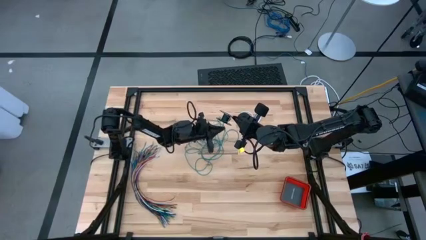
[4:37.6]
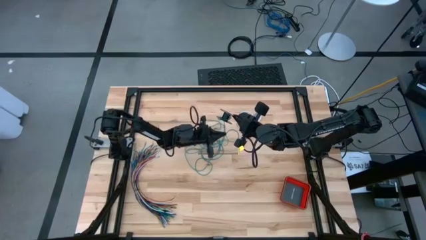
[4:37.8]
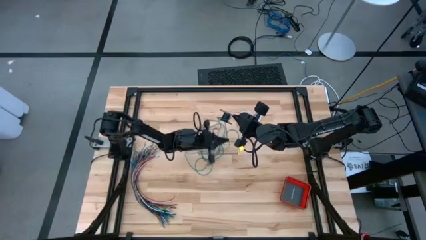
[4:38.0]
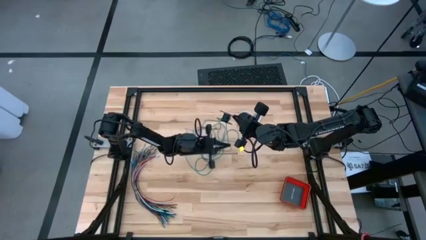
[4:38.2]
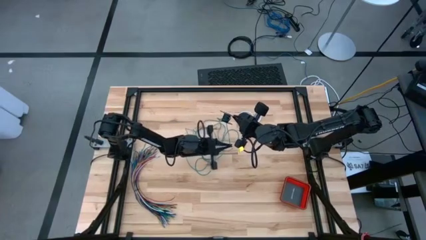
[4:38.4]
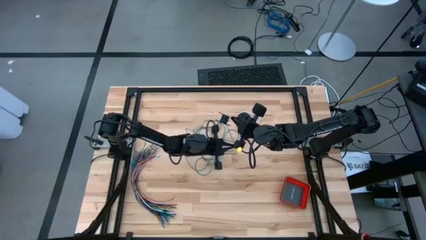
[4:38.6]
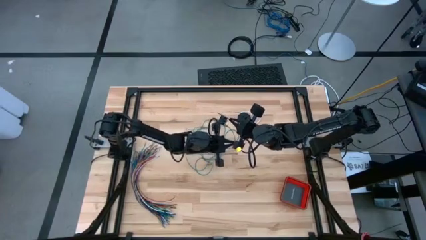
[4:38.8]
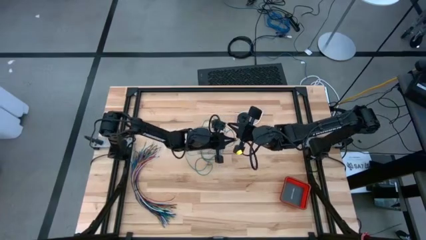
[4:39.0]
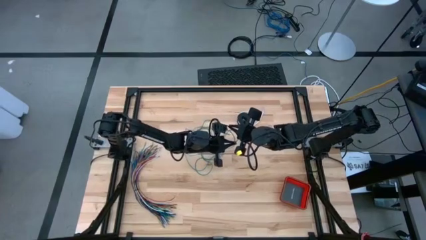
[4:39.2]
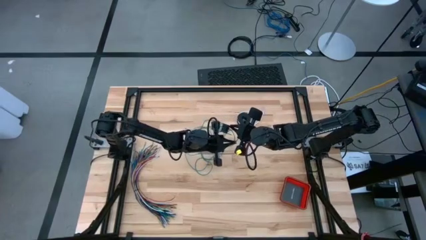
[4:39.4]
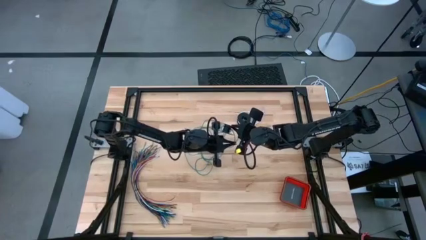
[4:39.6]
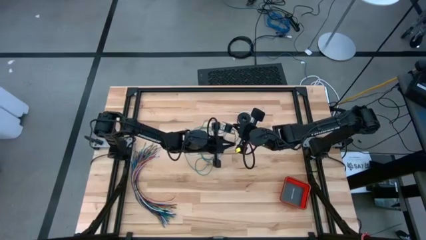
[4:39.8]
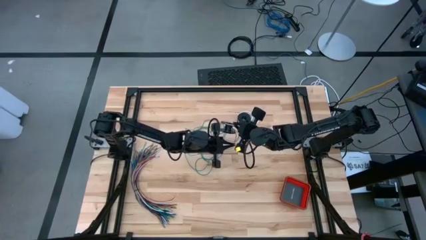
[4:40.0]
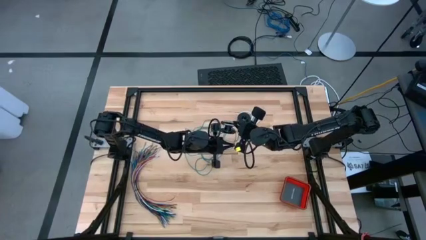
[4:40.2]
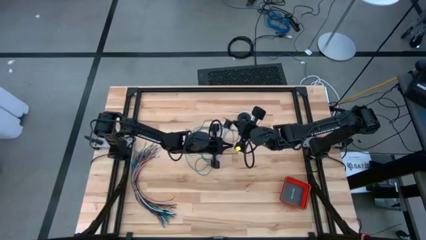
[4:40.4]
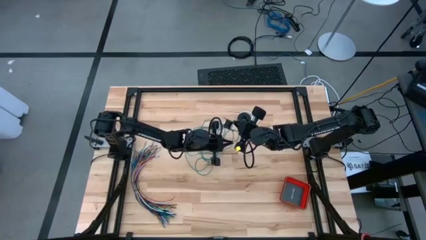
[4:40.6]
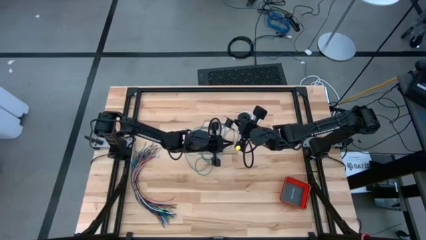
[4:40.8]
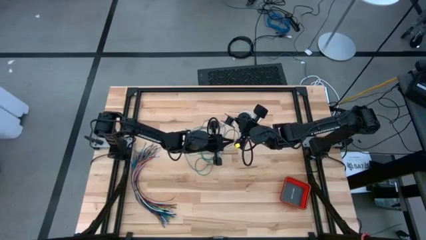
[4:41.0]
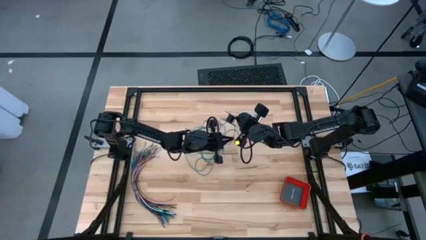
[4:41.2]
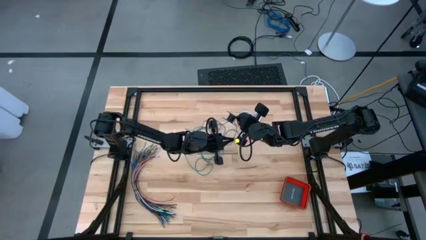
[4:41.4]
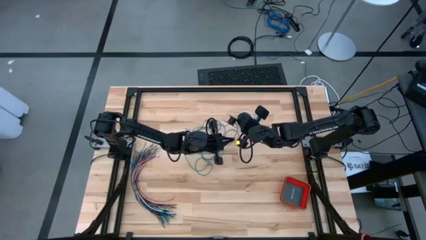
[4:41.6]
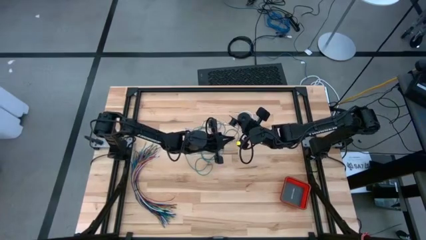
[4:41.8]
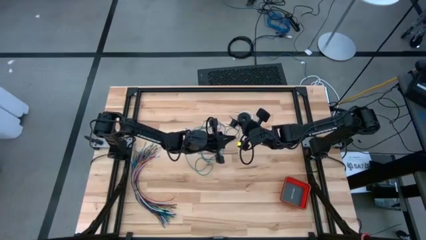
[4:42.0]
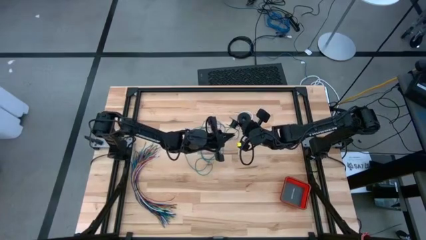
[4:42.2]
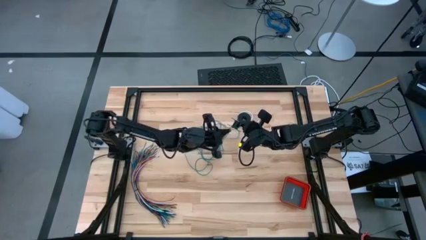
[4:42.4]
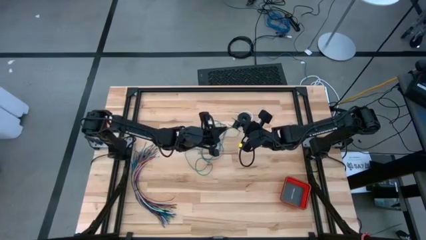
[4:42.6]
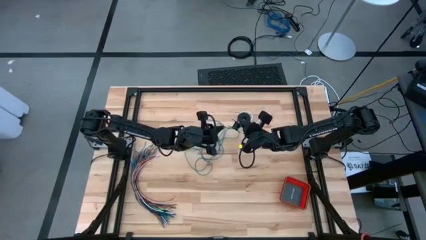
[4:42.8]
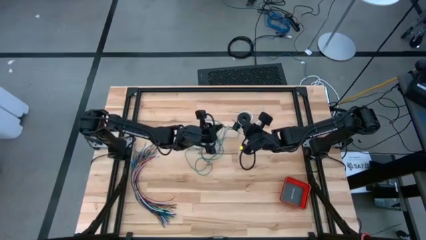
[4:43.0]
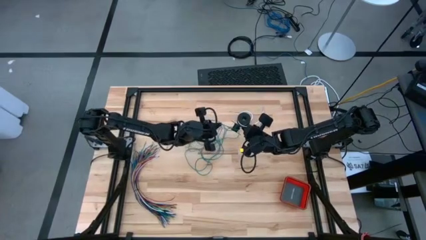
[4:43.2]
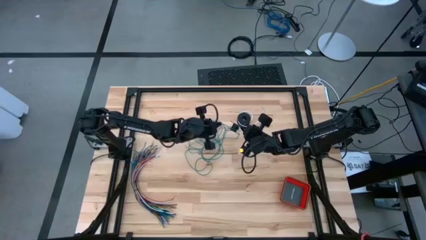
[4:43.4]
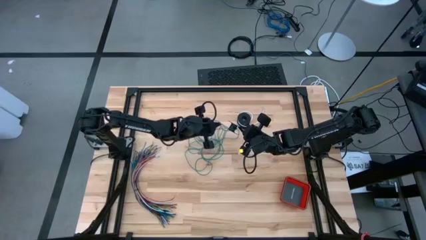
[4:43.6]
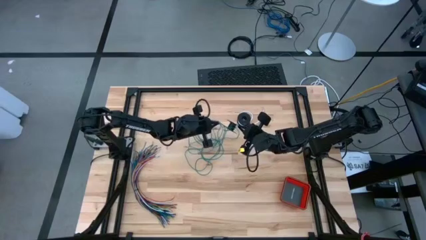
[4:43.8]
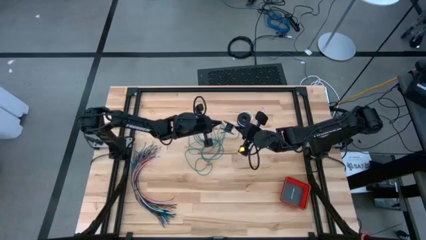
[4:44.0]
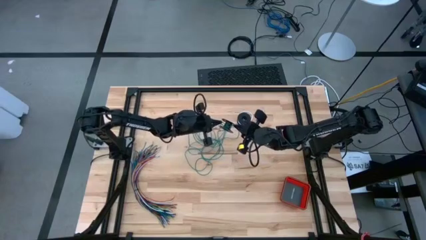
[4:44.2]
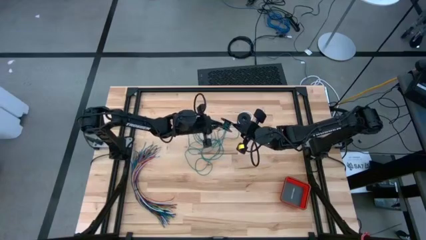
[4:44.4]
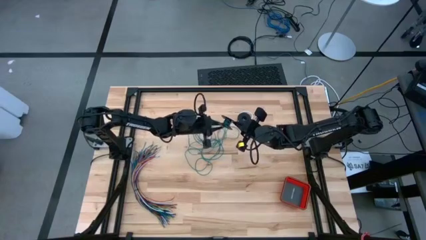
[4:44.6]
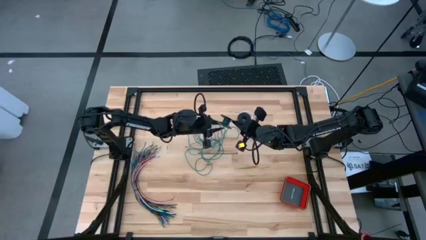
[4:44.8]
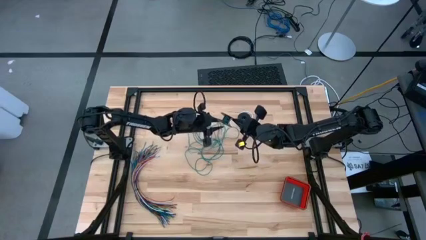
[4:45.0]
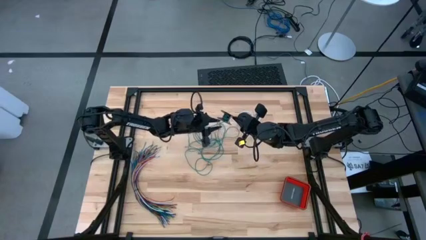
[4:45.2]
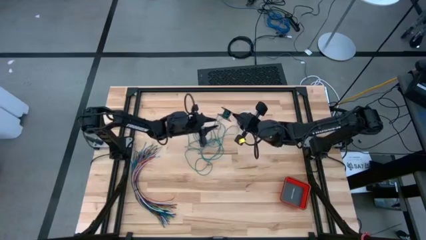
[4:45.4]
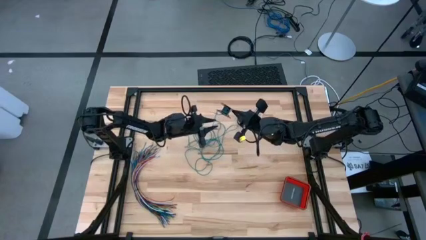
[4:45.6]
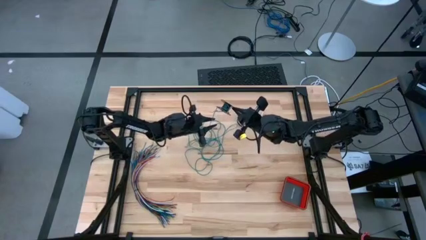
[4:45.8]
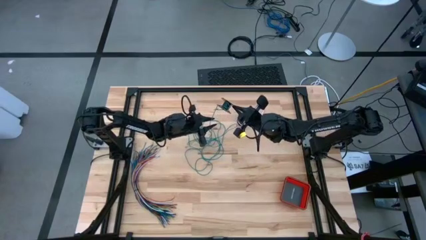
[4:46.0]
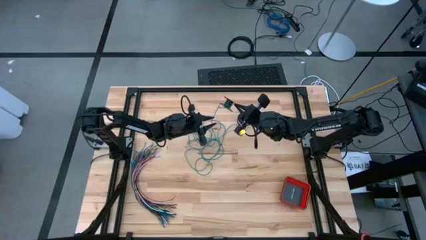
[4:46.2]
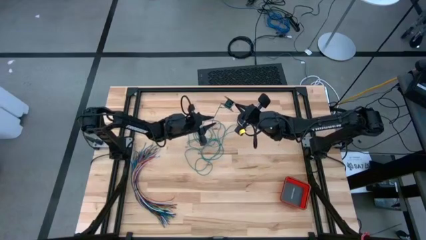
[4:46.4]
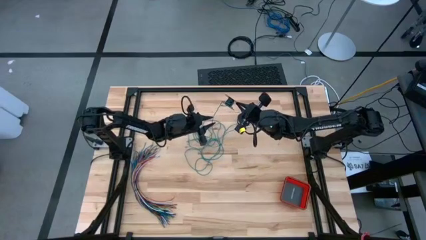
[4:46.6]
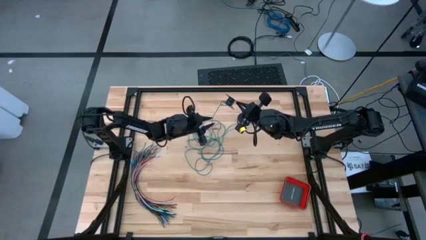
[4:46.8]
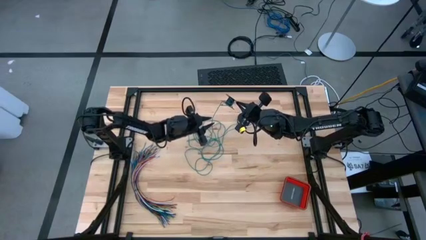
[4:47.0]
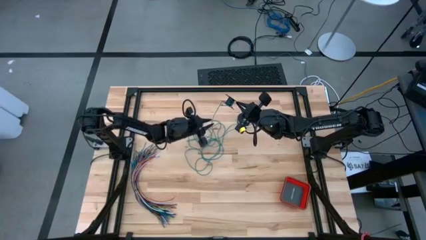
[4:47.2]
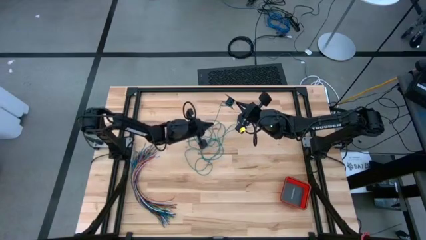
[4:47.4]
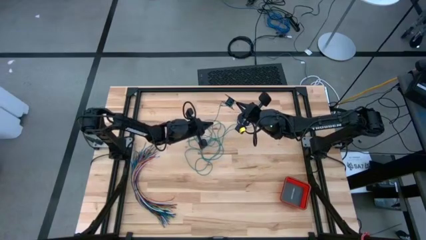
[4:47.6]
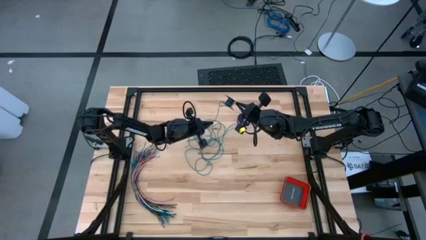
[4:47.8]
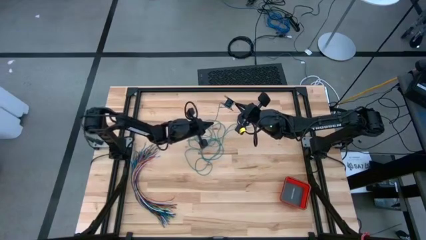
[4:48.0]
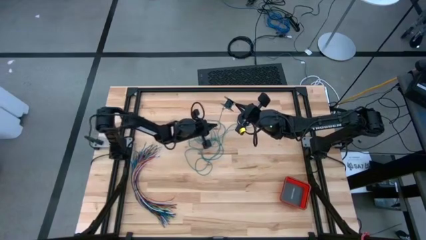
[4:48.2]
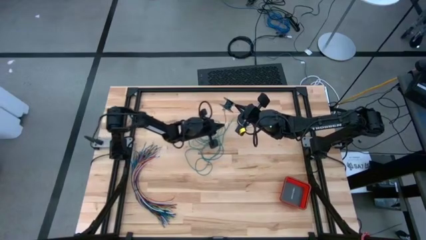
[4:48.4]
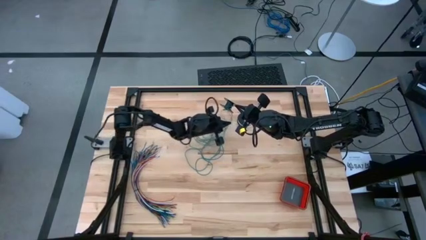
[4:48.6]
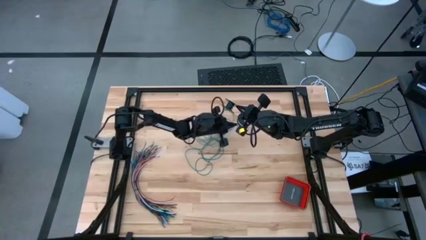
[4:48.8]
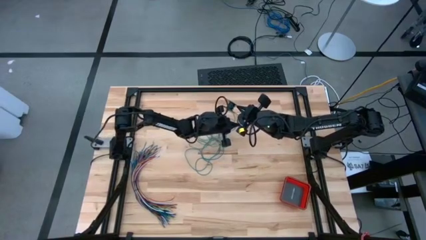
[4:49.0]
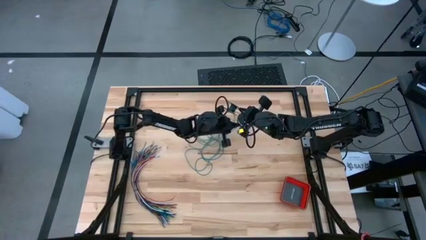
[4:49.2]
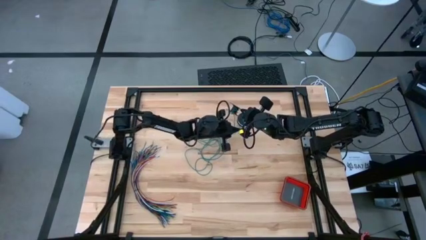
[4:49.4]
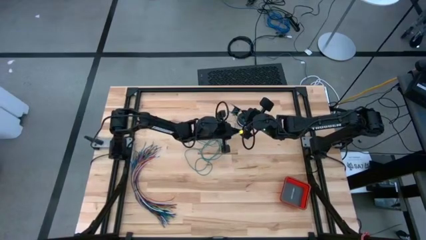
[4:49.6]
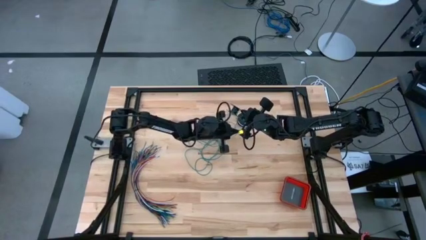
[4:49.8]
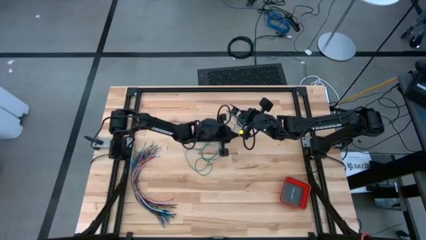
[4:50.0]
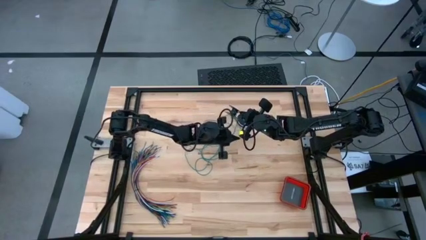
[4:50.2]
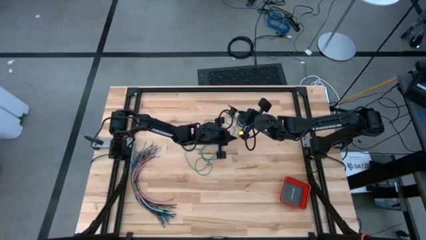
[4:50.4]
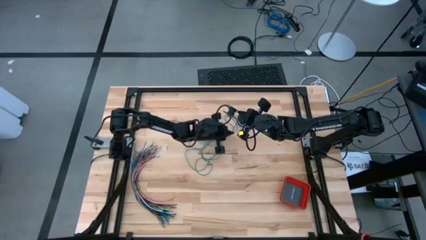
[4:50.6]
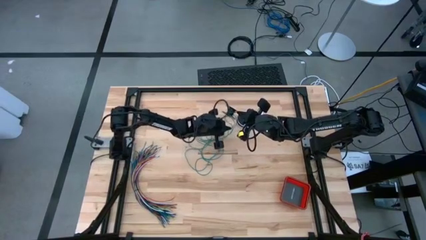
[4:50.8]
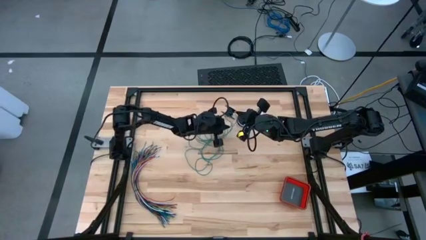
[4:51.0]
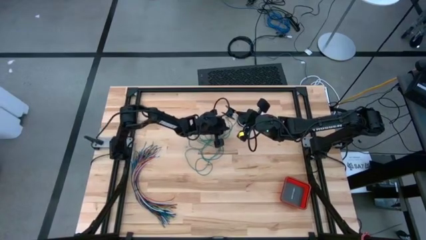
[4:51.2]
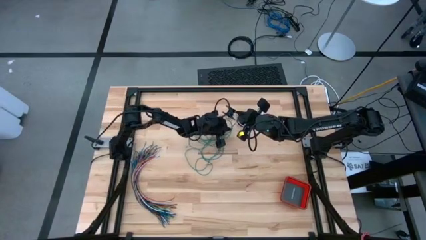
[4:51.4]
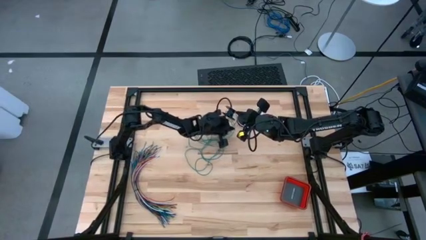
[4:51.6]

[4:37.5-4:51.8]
Task: Coil cords
Coil the green wire onto the spool

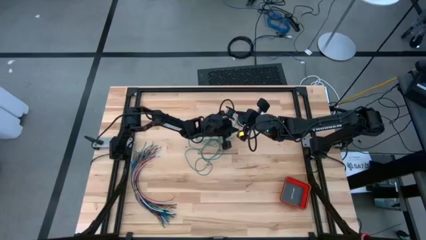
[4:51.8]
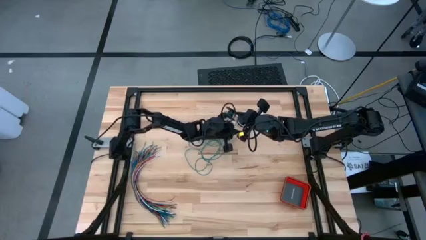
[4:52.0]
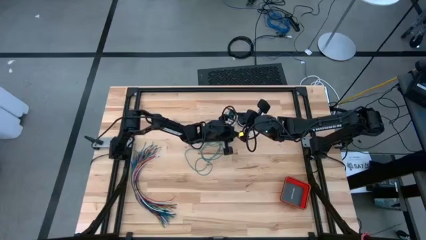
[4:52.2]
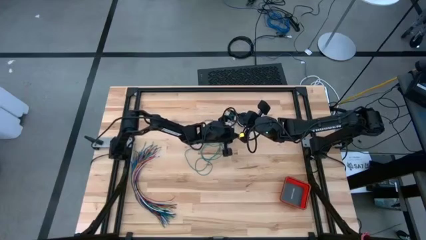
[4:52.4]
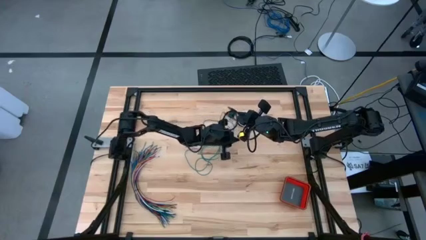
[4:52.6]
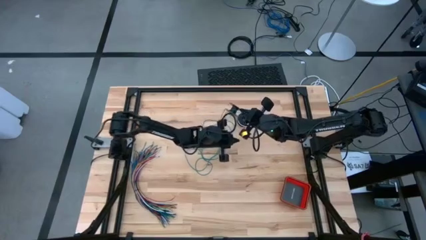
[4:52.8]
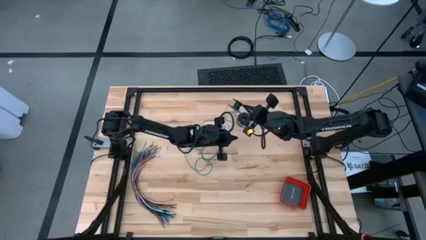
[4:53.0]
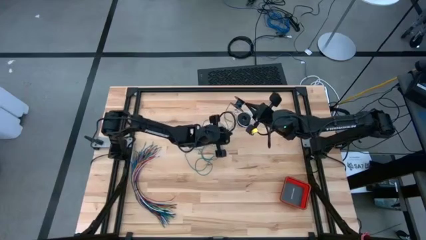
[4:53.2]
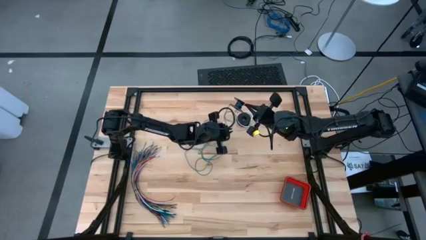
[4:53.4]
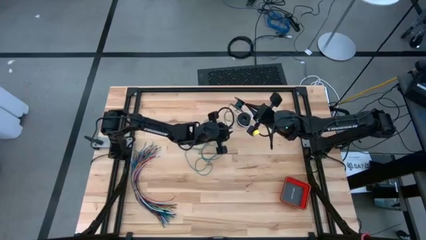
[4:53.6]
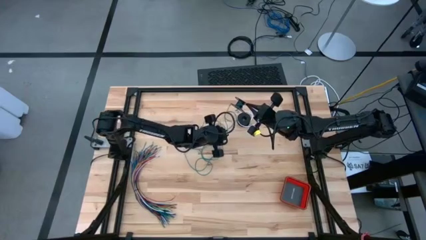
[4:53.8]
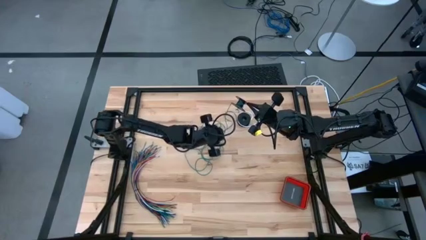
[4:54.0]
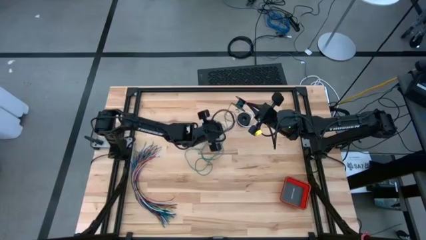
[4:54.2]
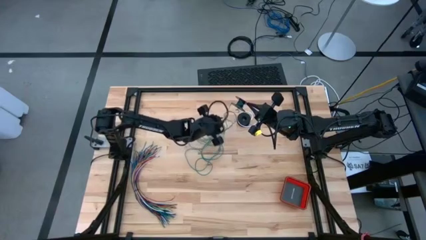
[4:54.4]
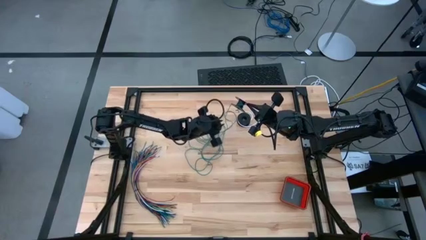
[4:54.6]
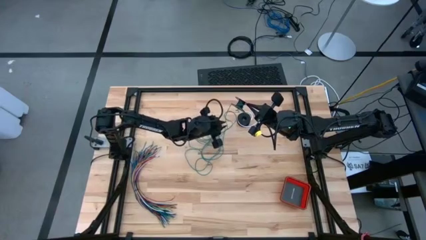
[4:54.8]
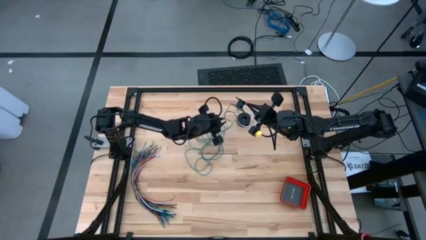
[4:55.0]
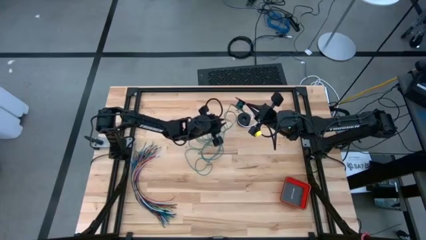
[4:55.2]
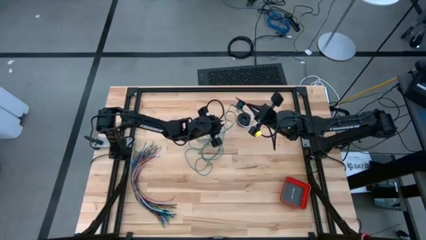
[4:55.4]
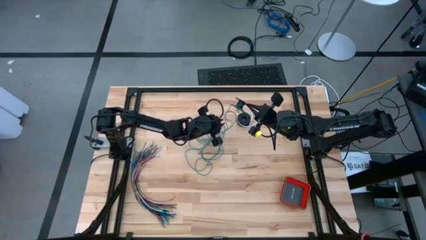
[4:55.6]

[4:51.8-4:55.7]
Coil the green wire onto the spool
